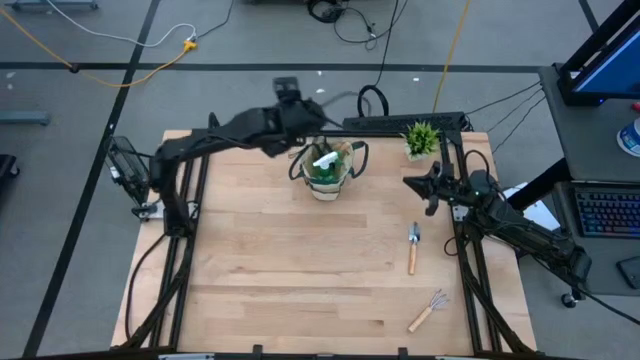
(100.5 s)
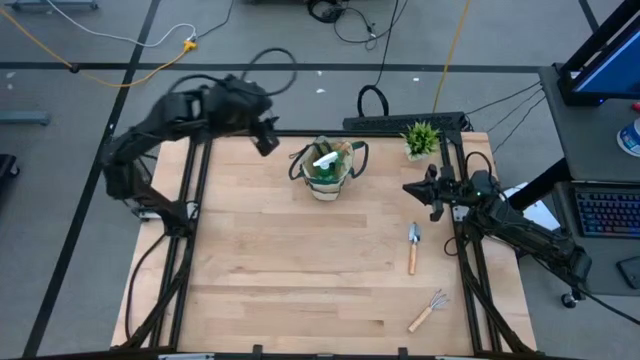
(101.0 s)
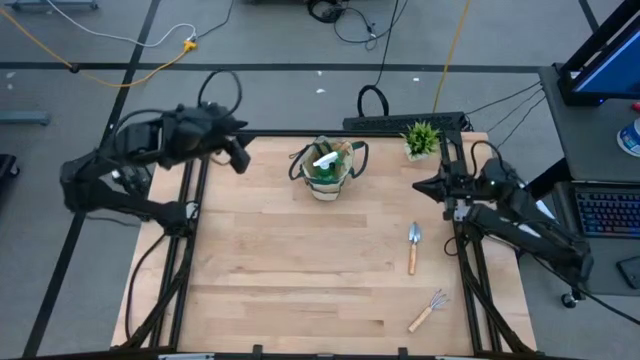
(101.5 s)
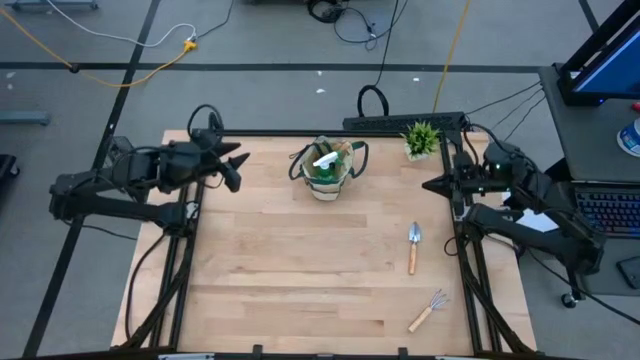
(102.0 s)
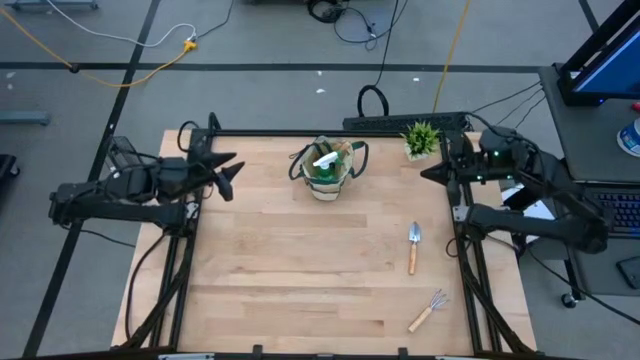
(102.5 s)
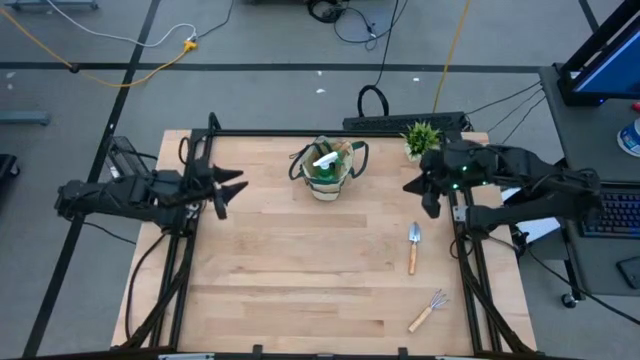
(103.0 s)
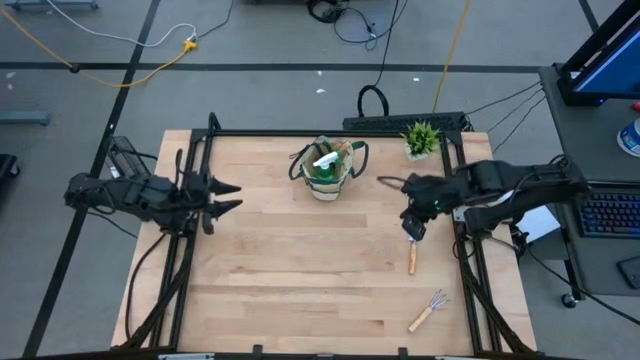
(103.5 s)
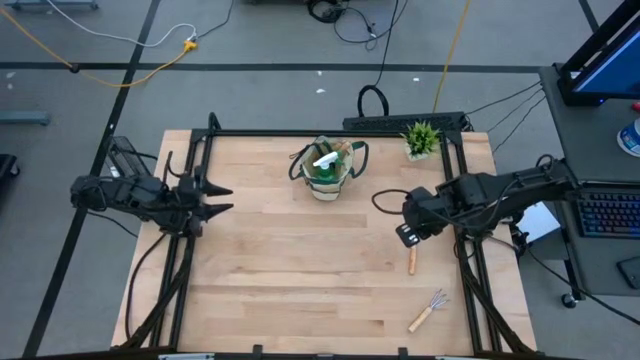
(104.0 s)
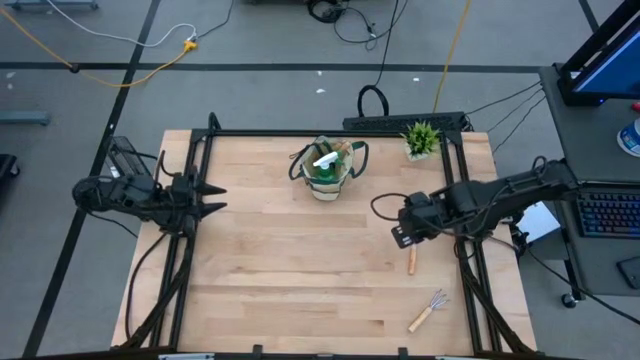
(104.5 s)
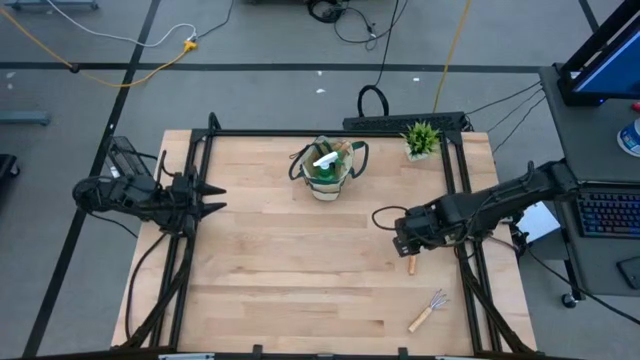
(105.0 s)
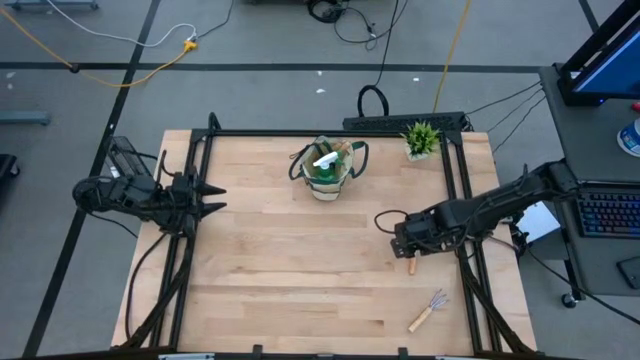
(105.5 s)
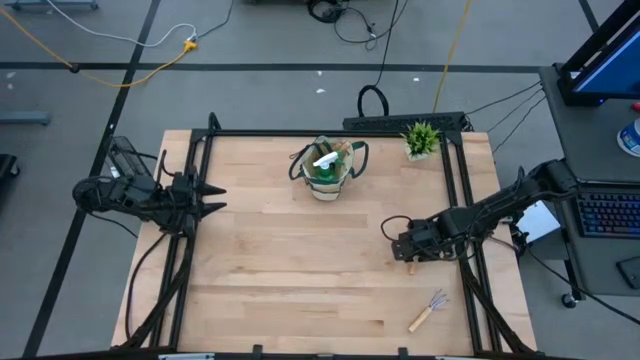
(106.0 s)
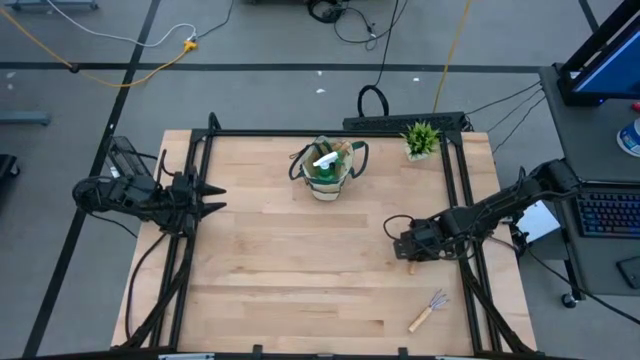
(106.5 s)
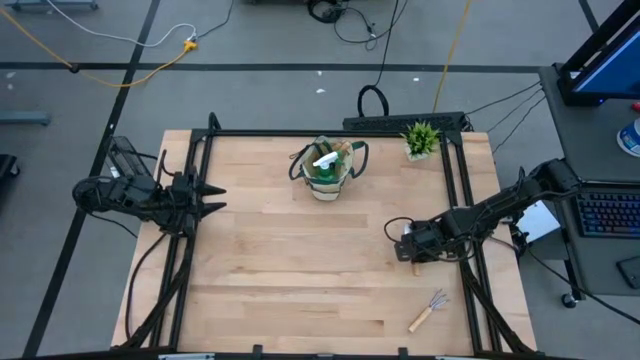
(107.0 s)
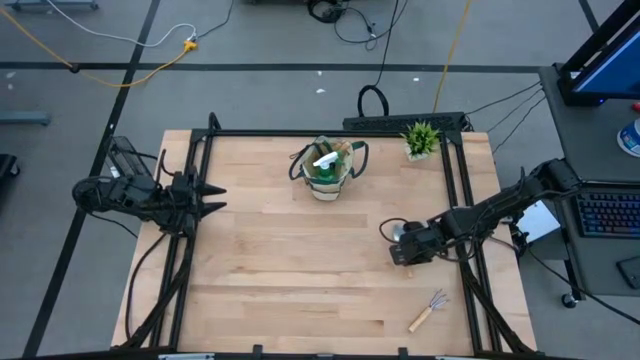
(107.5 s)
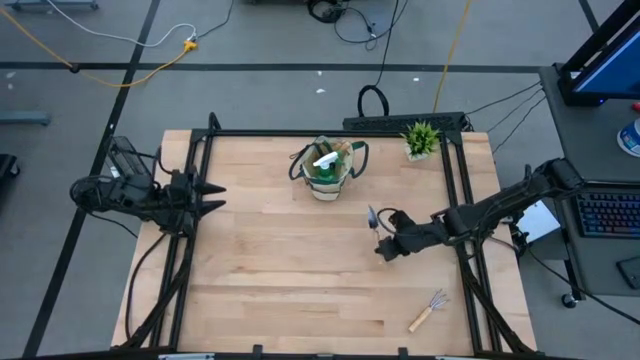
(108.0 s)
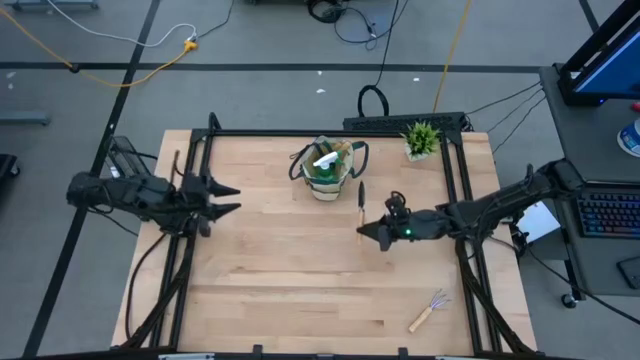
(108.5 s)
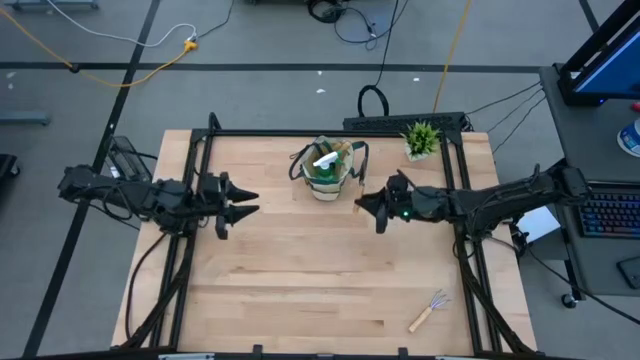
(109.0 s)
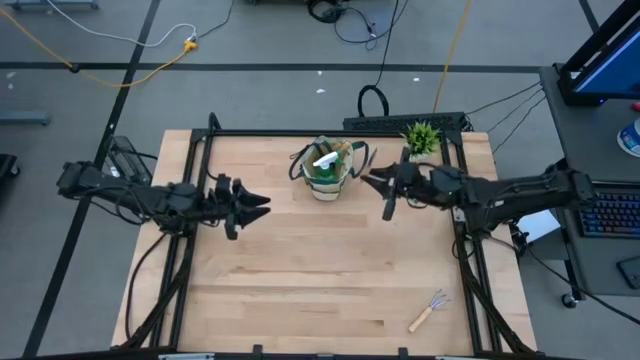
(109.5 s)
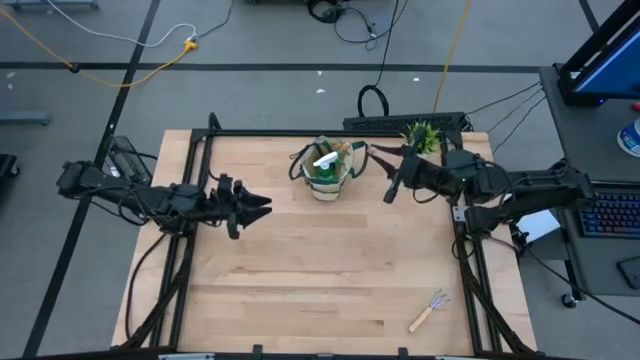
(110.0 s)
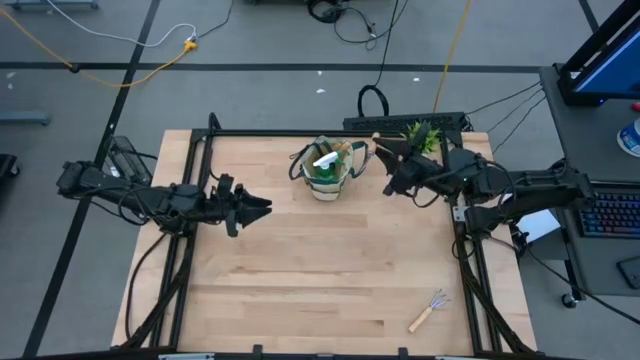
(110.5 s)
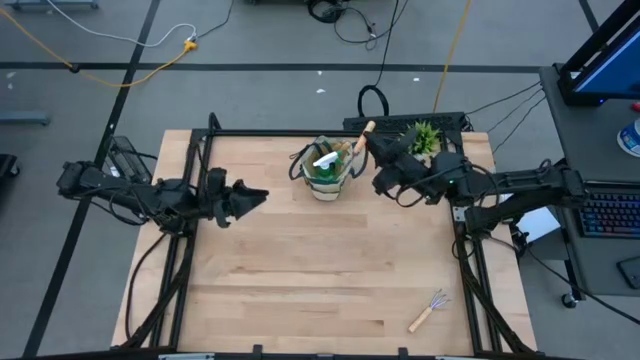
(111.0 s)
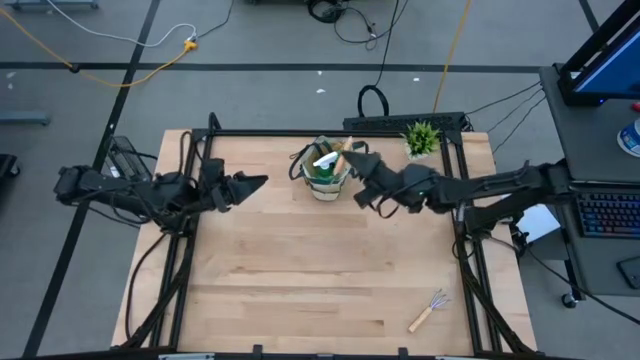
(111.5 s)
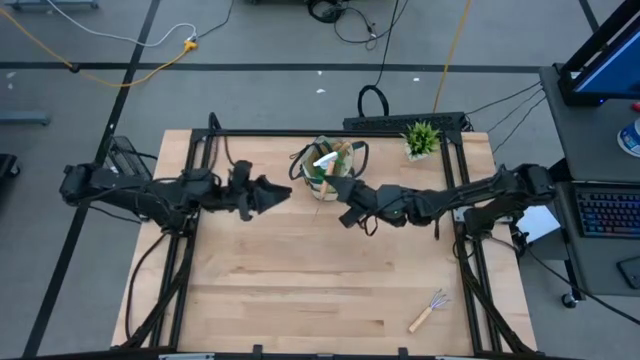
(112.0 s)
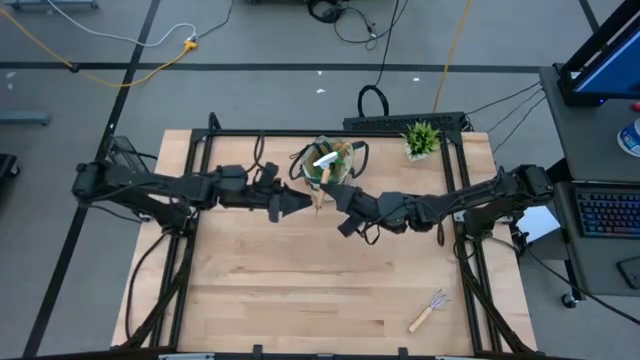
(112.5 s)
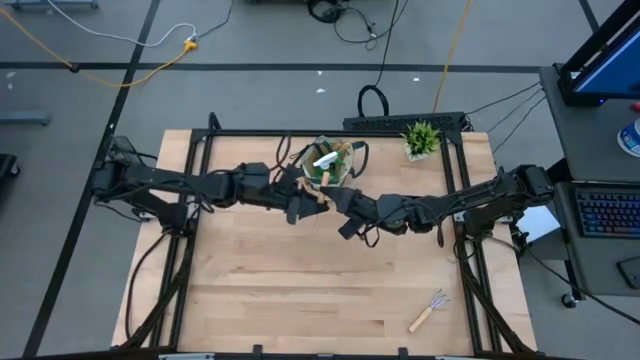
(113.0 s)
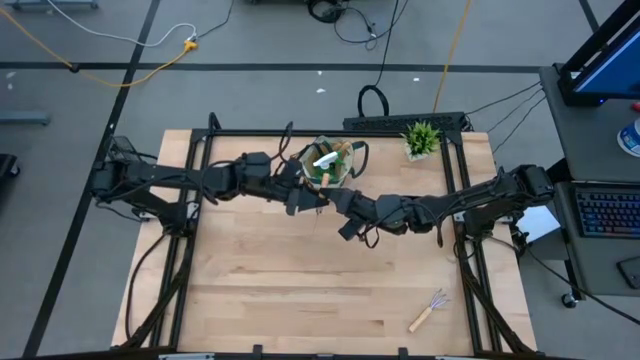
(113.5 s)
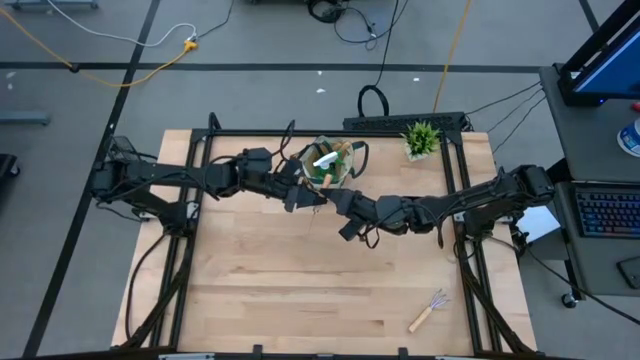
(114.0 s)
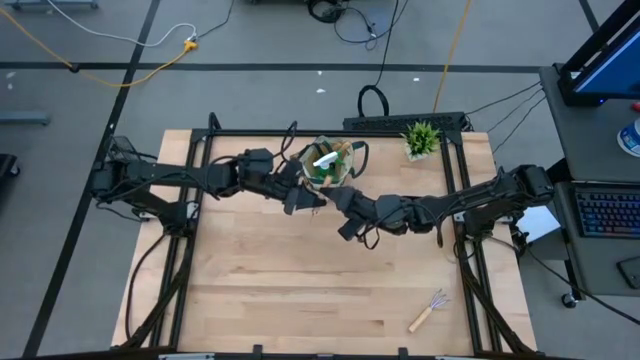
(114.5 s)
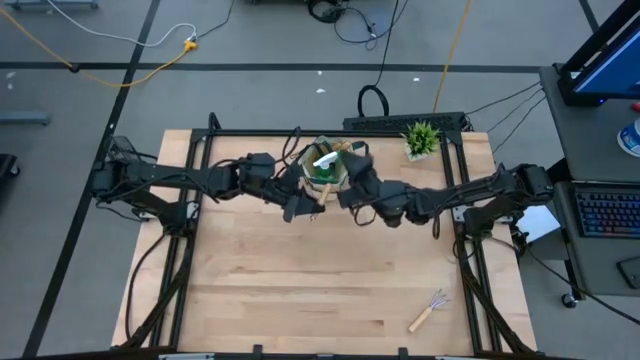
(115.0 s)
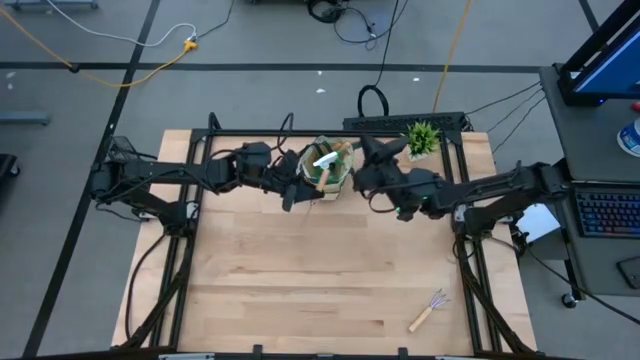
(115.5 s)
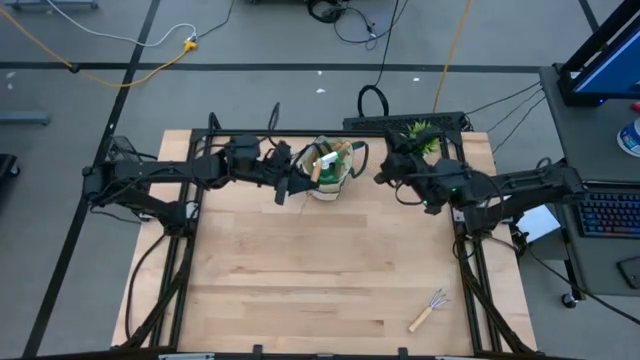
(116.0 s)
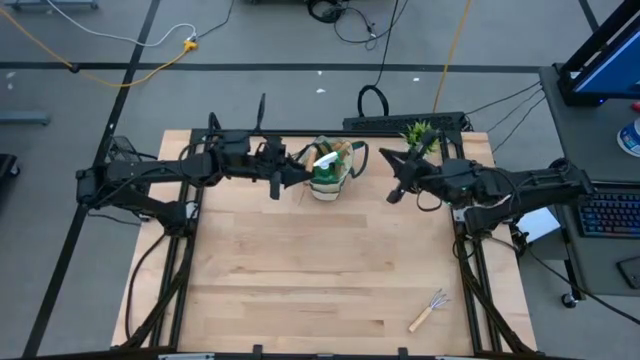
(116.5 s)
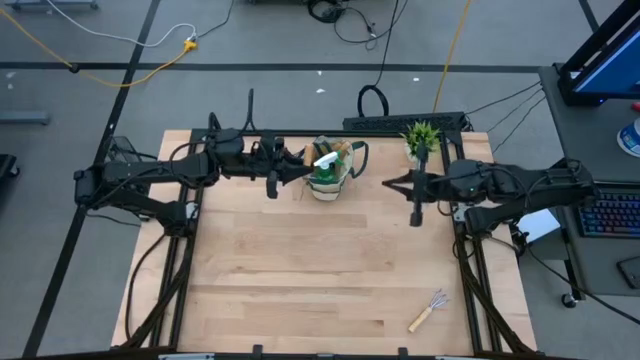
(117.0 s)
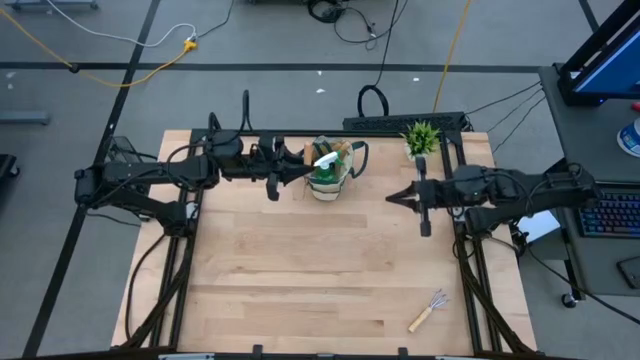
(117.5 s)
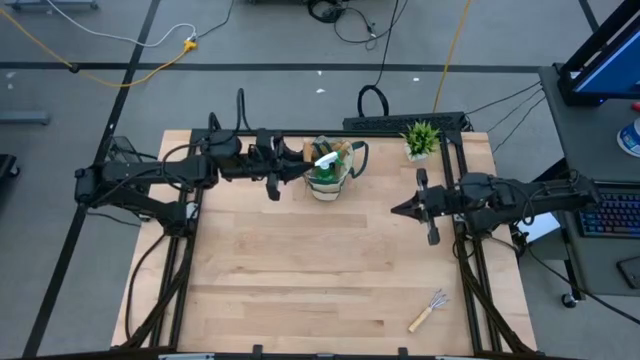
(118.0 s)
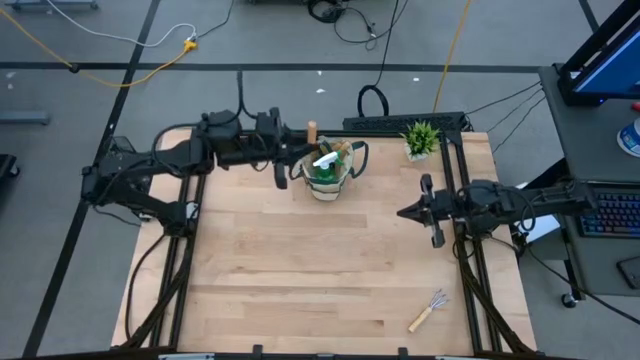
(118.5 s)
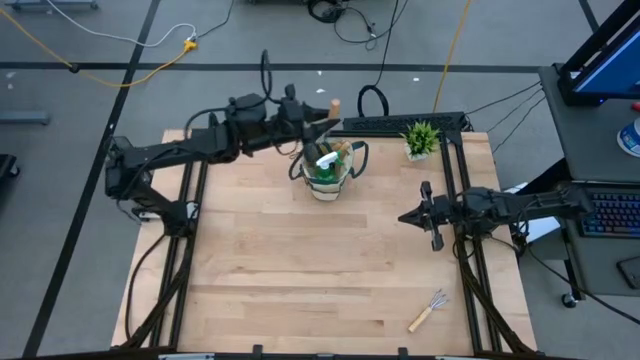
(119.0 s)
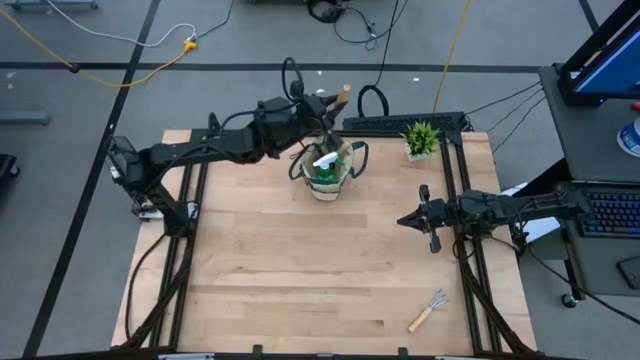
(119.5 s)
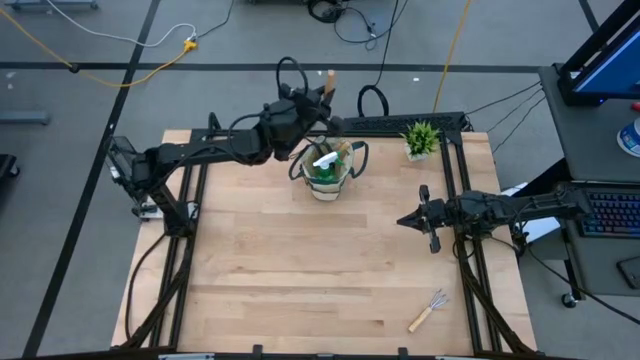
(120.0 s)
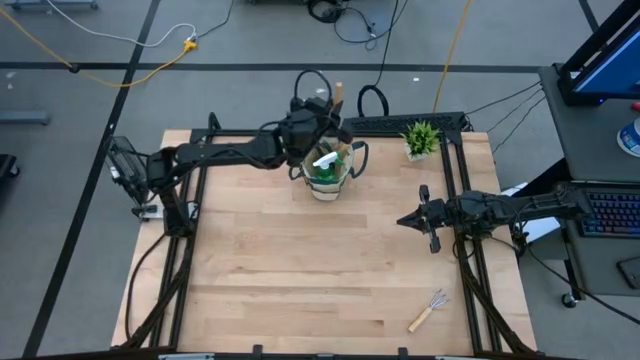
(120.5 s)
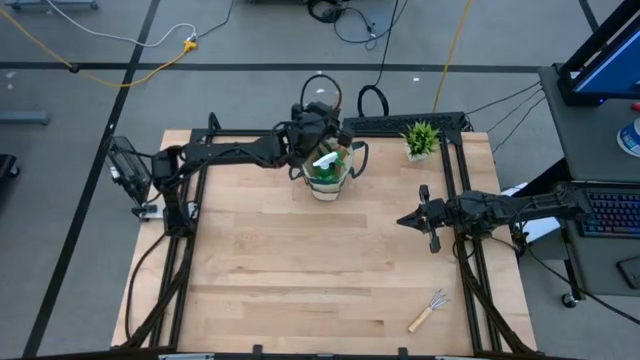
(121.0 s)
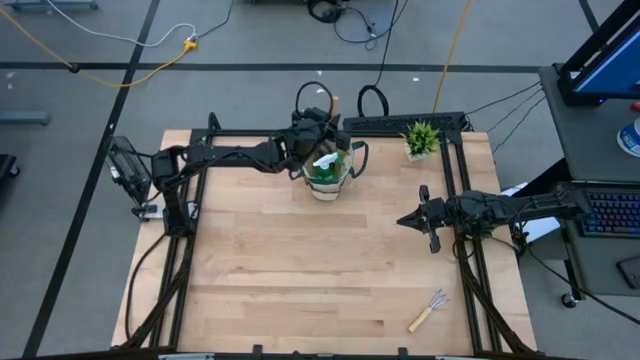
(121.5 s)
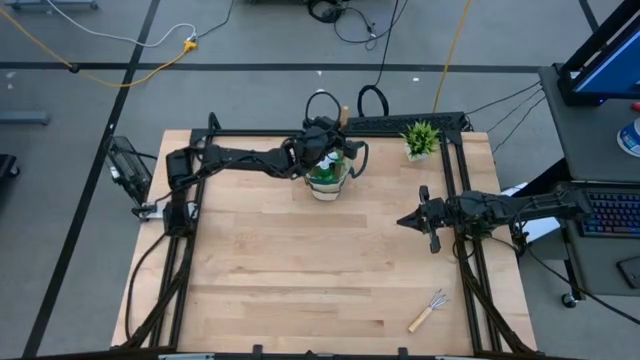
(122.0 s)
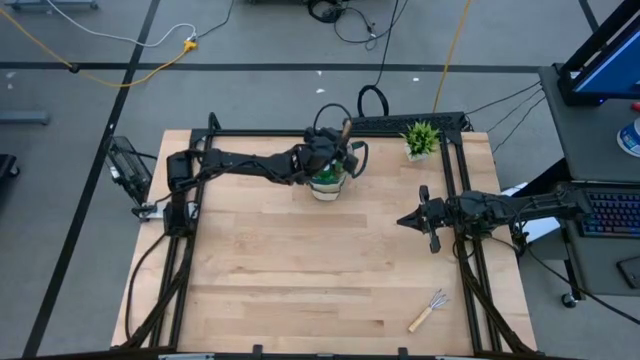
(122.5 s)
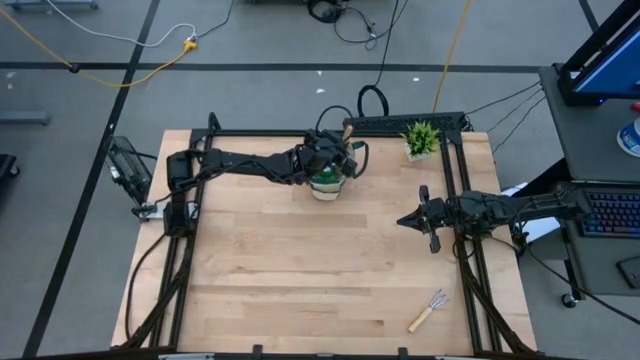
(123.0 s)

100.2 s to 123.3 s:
Task: Pick & Place Garden tools in Gardening bag
Put the brown trowel into the gardening bag
